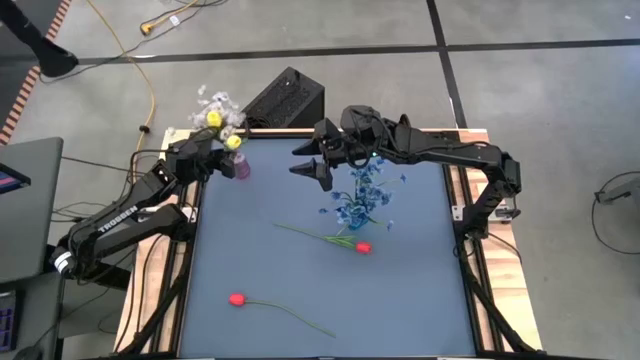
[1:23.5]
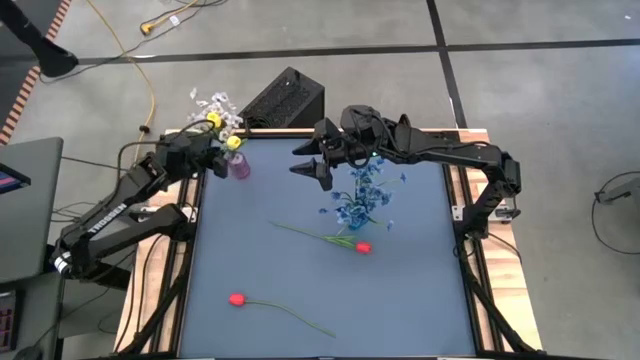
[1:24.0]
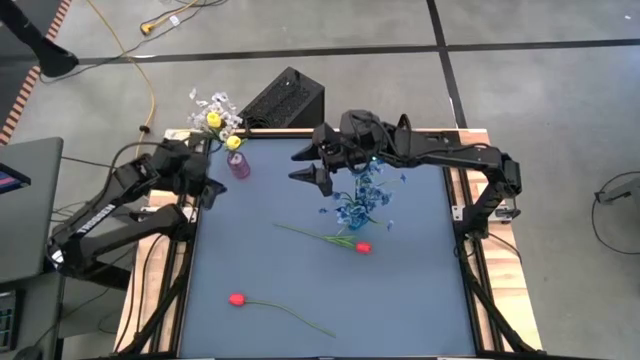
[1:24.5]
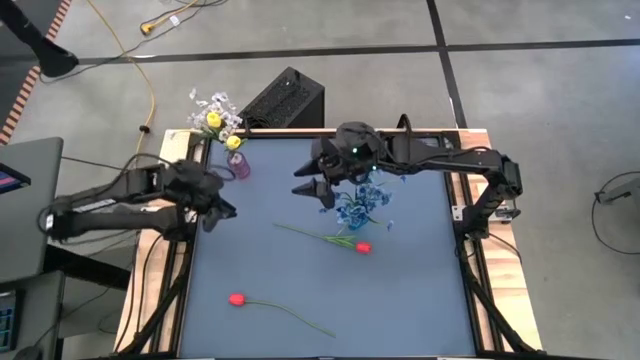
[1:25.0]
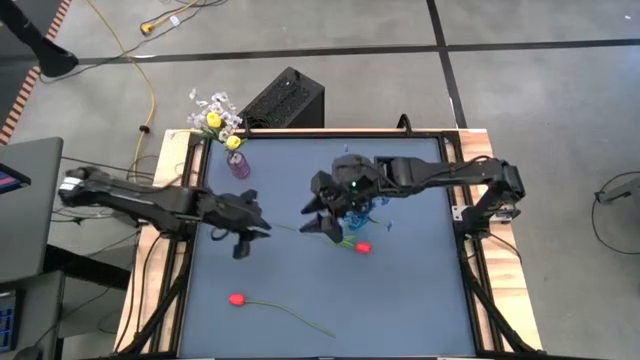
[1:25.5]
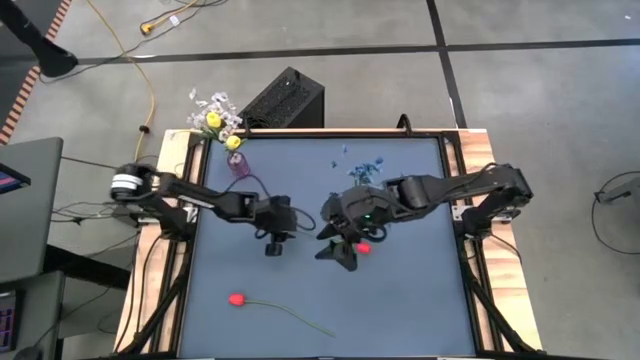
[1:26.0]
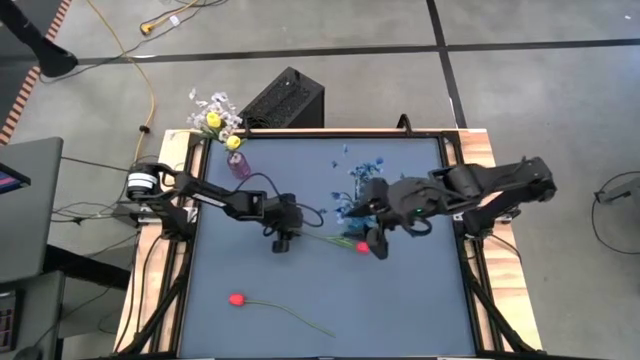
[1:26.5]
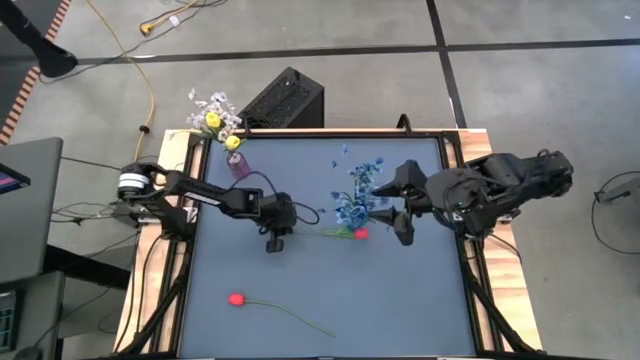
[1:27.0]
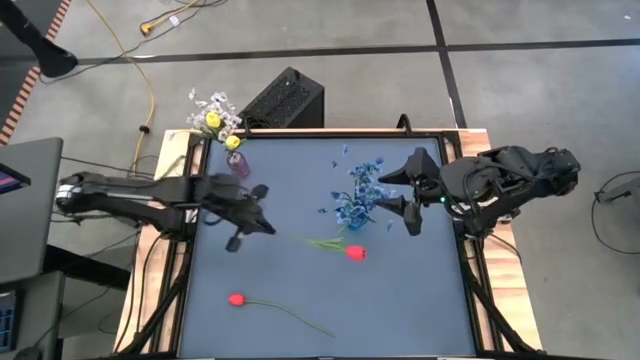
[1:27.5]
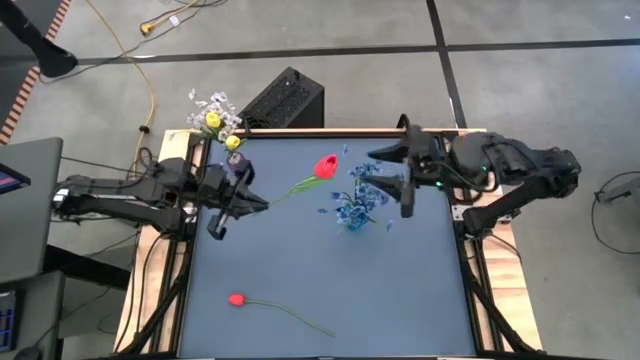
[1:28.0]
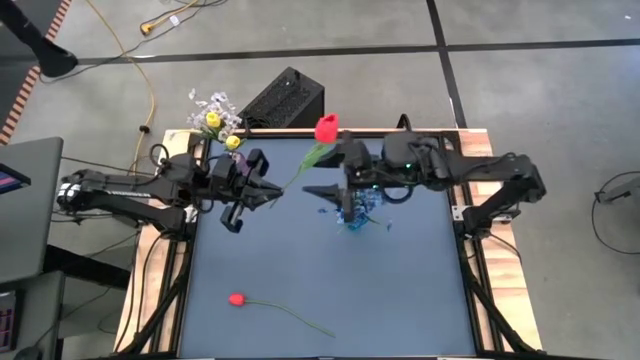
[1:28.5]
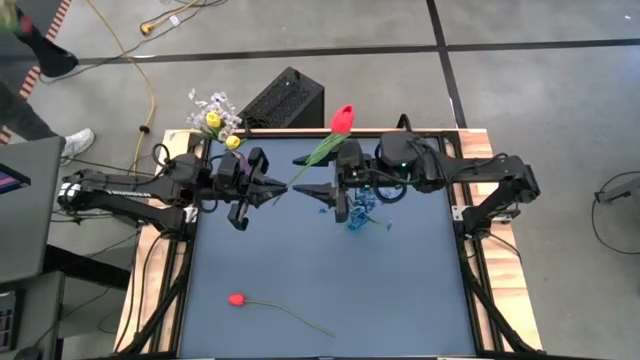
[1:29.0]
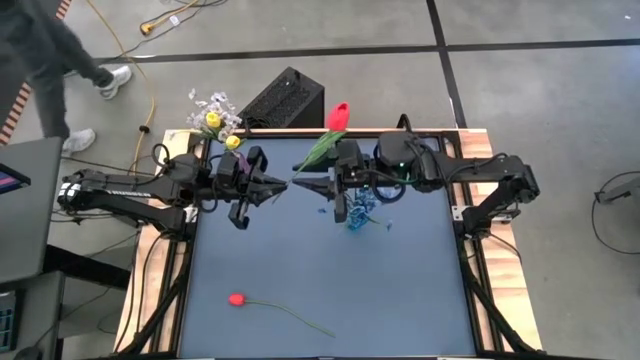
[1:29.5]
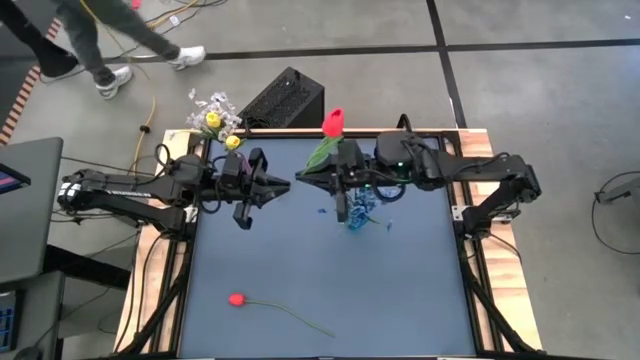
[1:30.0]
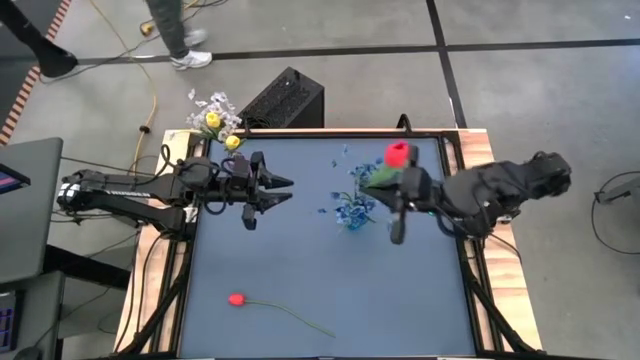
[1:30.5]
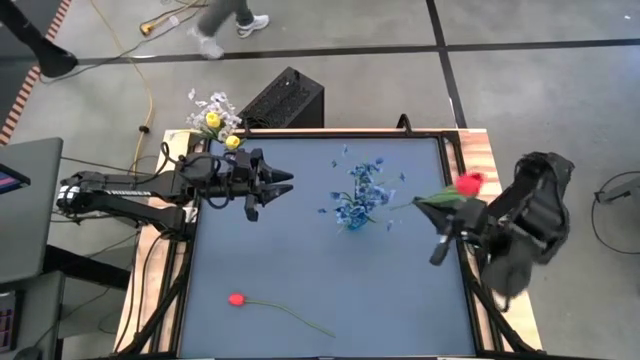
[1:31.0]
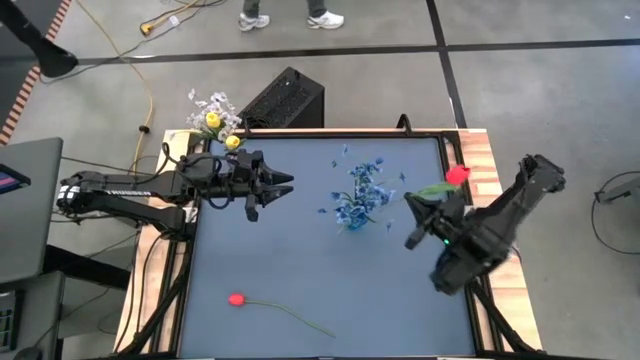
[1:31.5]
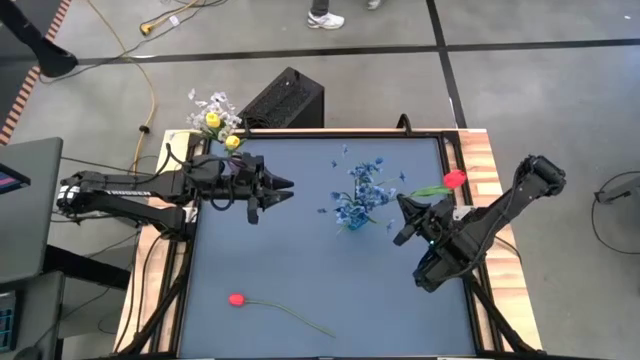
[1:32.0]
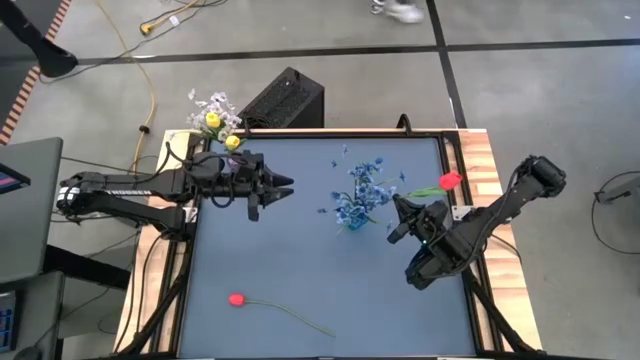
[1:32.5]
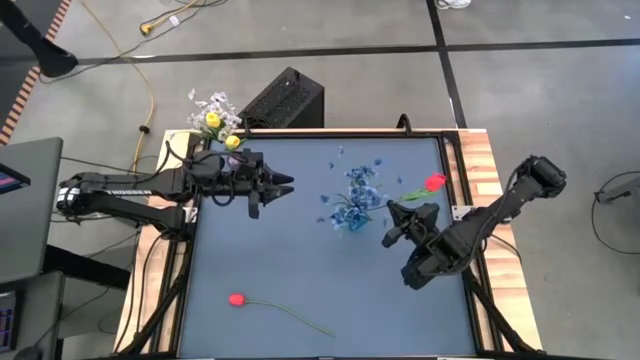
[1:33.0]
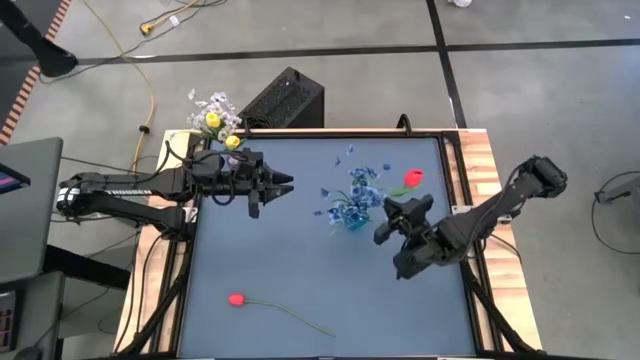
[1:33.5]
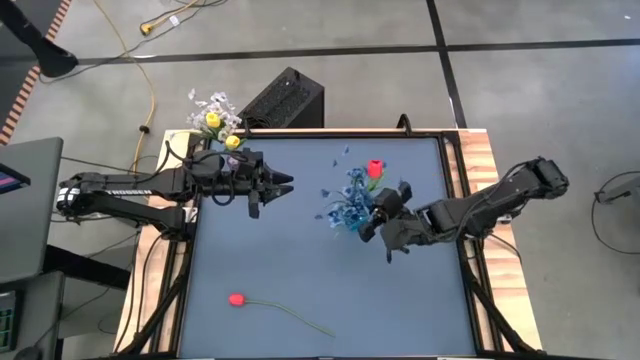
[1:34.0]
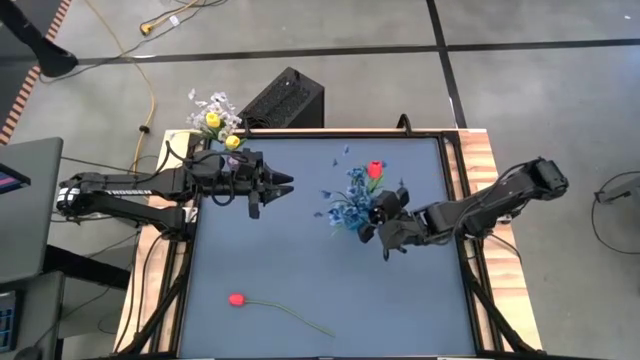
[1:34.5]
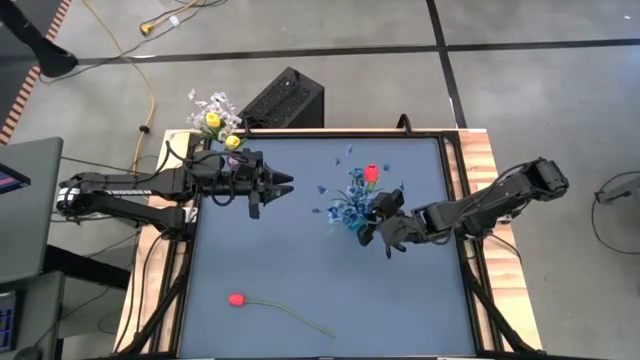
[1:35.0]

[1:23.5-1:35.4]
Task: Sort flowers into vase by color
Put the top red flower into the blue vase

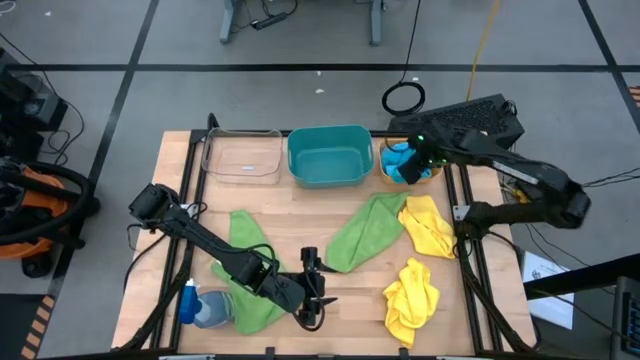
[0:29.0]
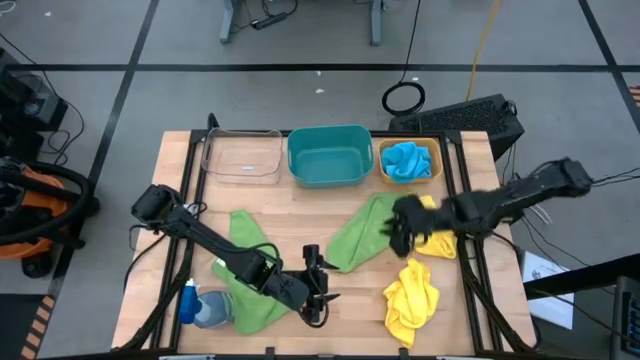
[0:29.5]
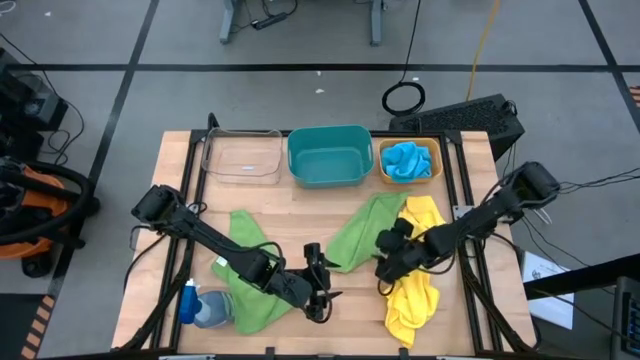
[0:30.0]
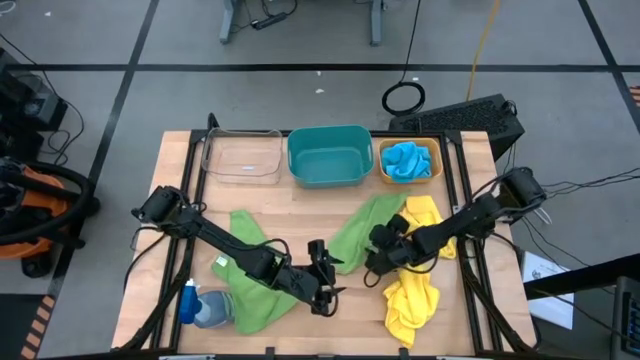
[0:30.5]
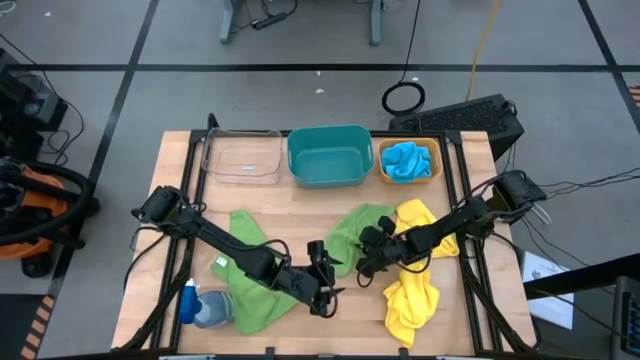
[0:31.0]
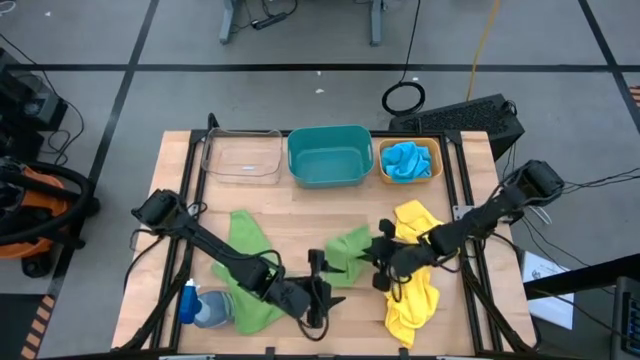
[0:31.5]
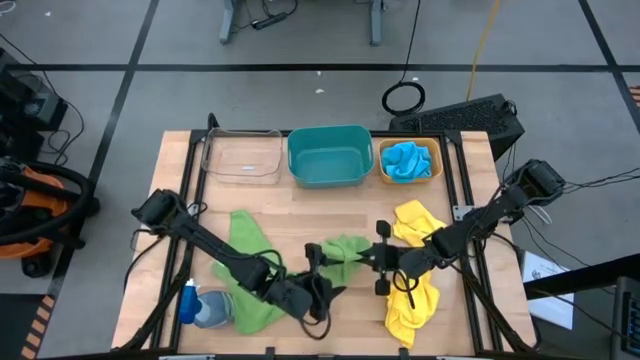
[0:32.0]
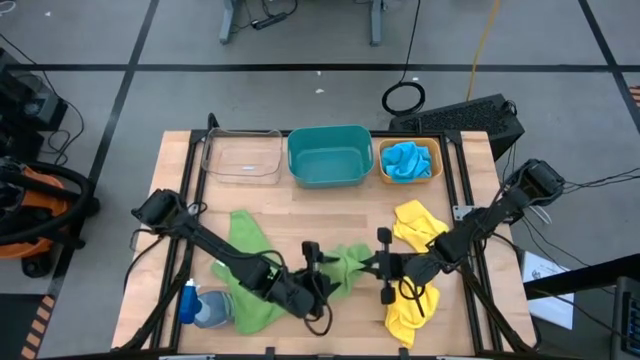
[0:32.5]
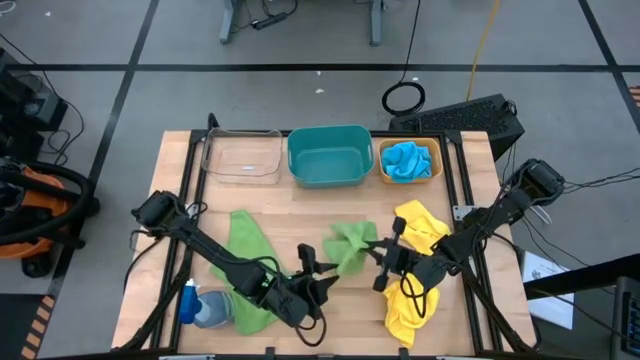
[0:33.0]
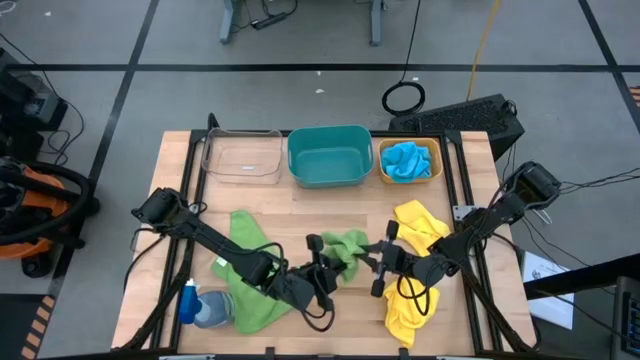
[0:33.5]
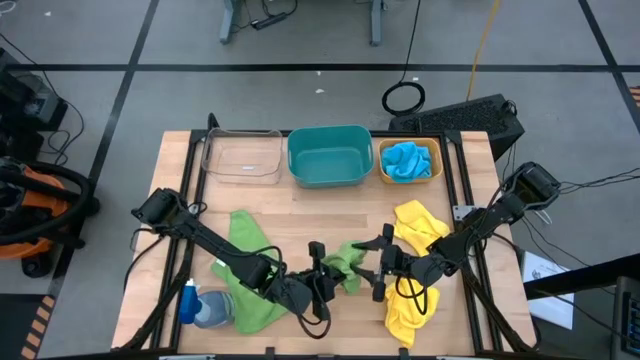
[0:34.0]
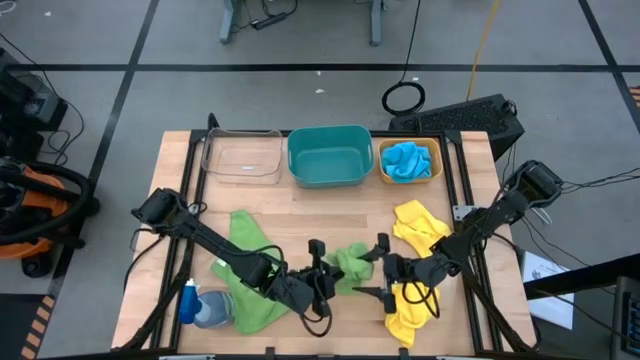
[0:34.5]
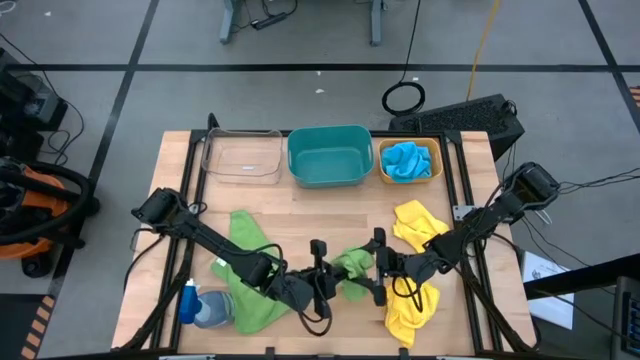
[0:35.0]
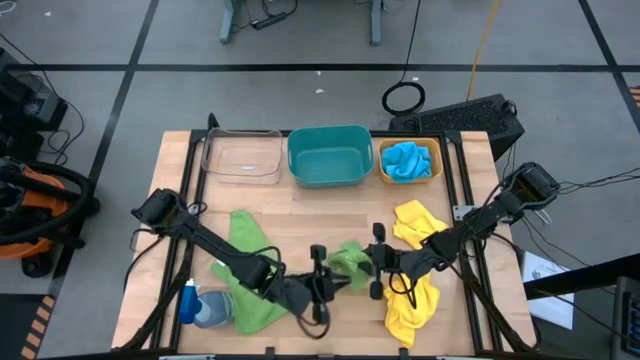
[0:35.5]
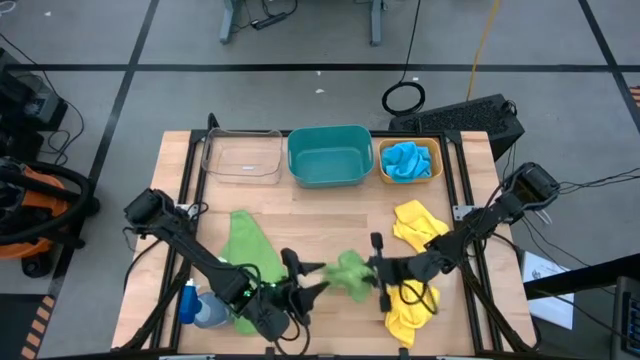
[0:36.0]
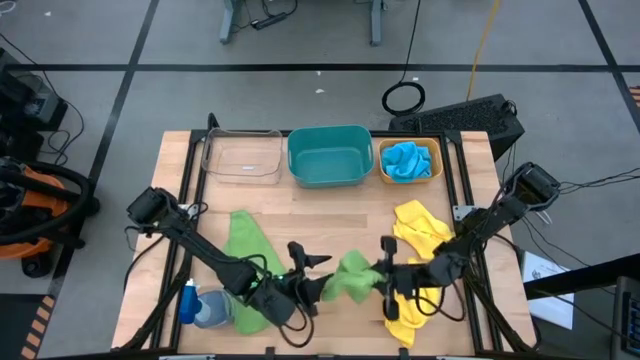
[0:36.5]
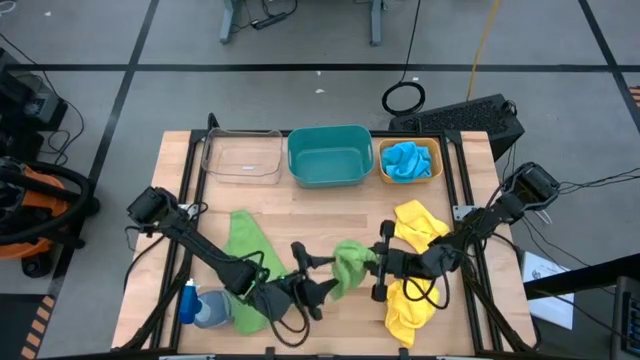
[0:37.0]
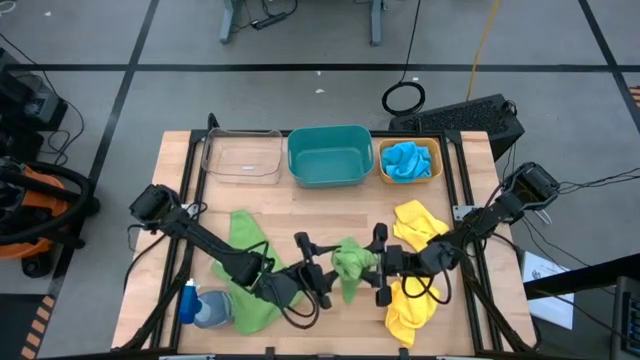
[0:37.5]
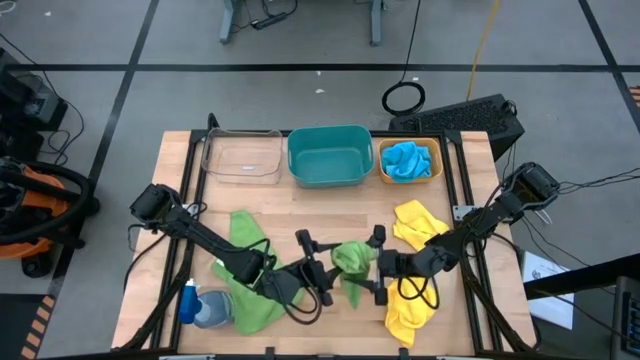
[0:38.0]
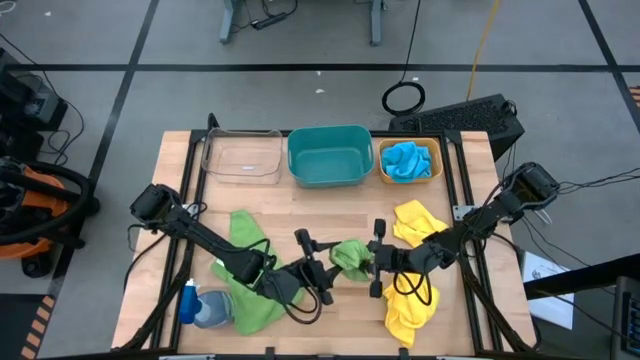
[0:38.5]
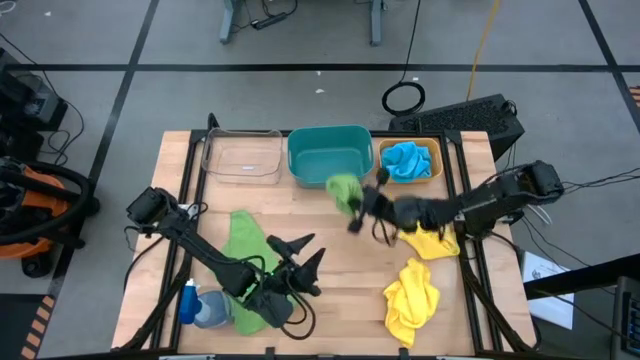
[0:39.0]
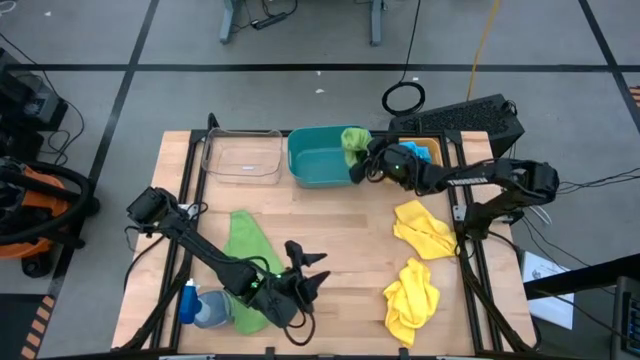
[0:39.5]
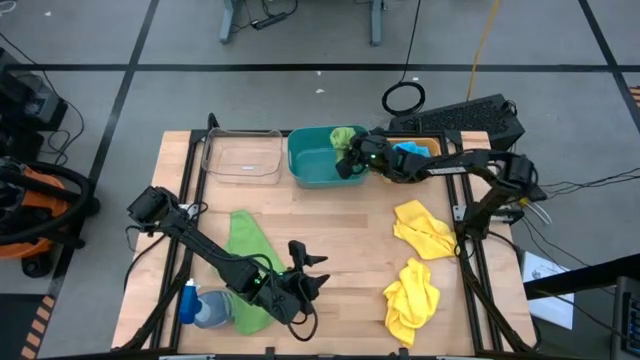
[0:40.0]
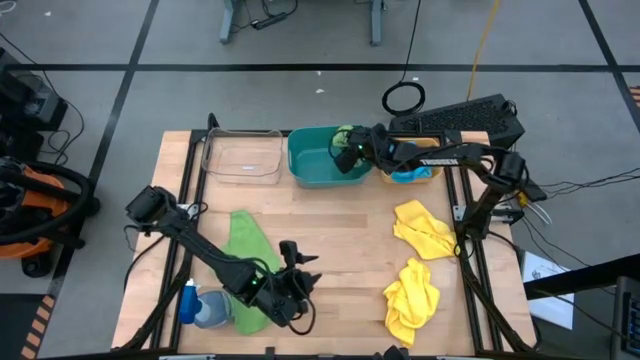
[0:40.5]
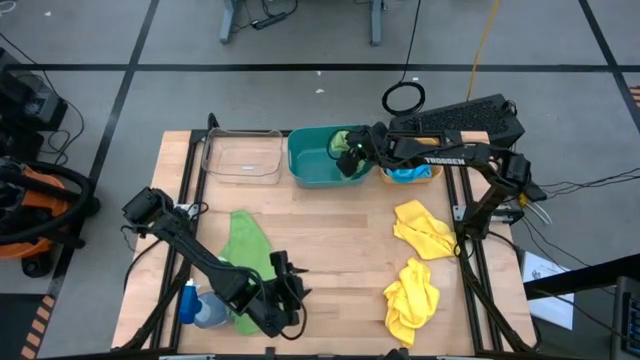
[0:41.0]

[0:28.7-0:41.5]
Task: Sort microfiber towel by color & place in baskets
Put the right green towel into the blue bin
